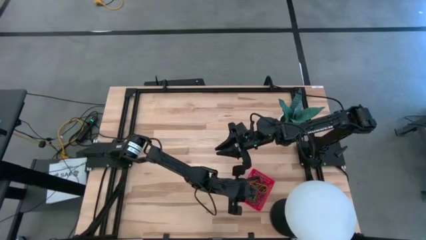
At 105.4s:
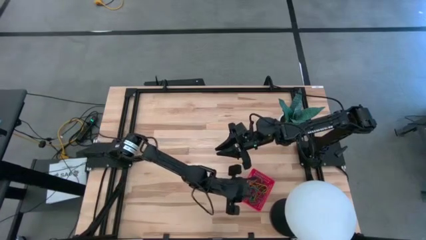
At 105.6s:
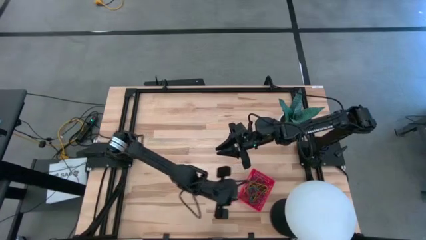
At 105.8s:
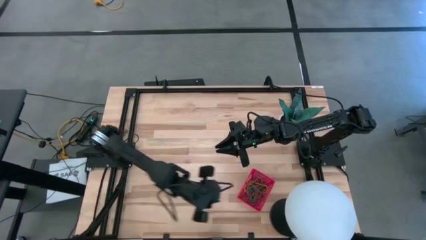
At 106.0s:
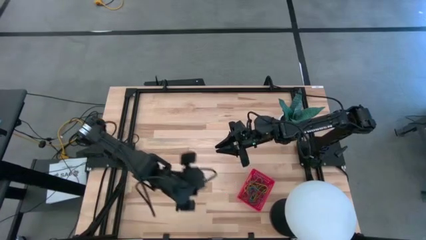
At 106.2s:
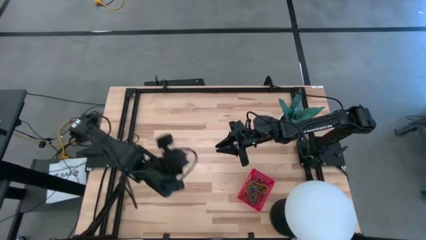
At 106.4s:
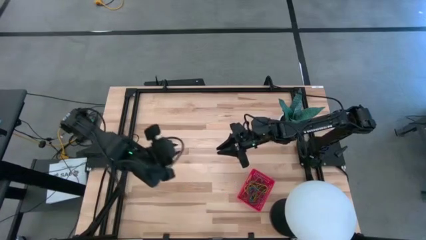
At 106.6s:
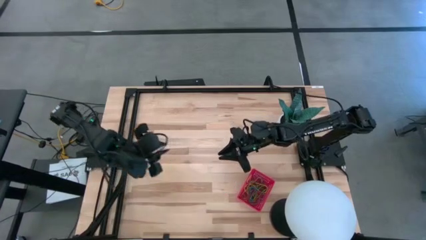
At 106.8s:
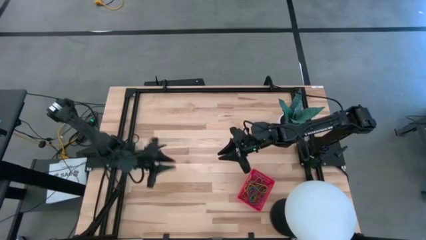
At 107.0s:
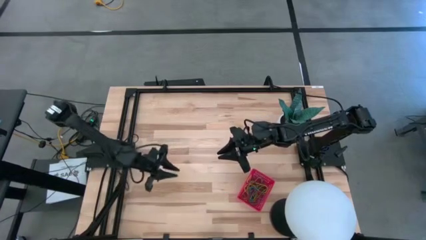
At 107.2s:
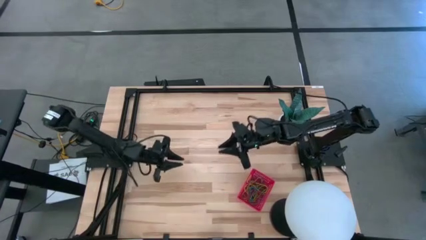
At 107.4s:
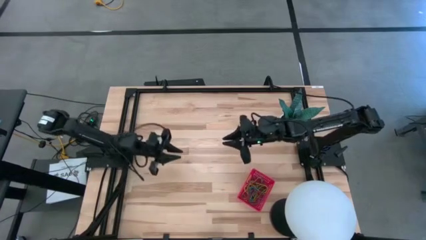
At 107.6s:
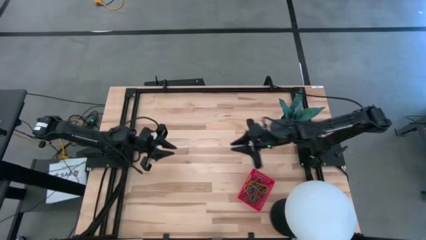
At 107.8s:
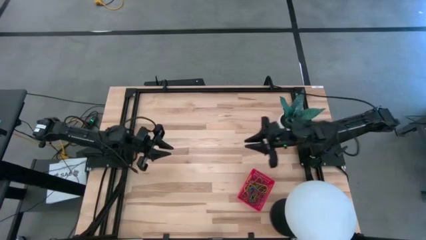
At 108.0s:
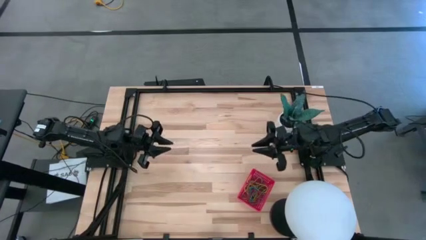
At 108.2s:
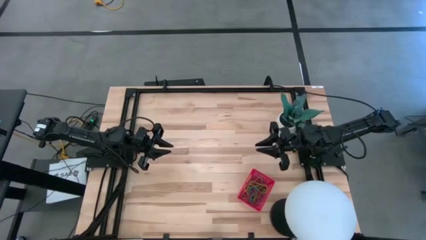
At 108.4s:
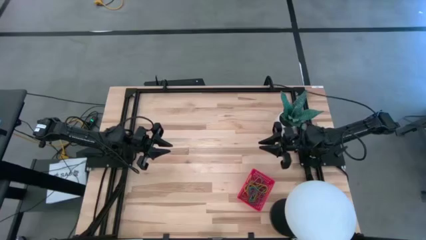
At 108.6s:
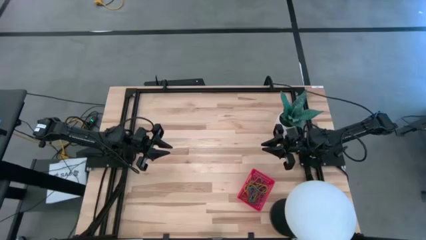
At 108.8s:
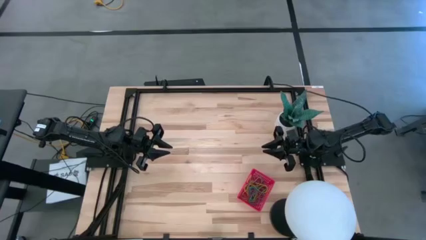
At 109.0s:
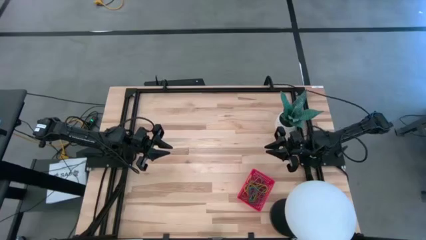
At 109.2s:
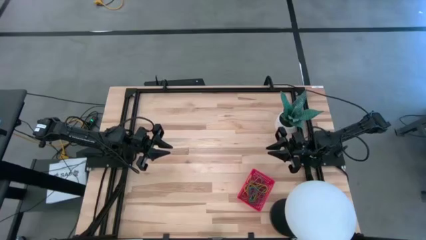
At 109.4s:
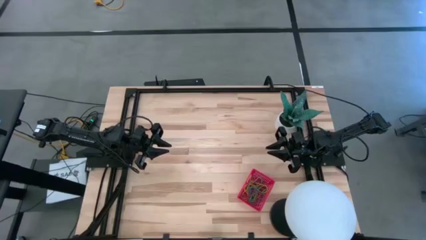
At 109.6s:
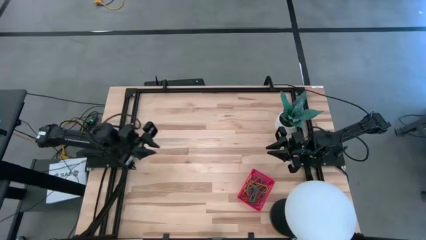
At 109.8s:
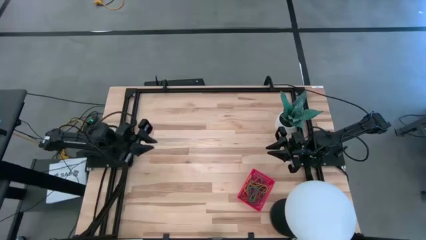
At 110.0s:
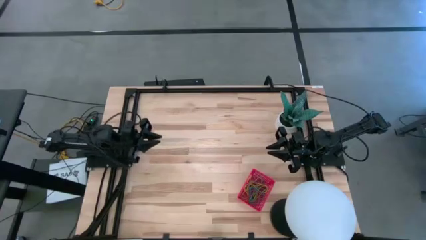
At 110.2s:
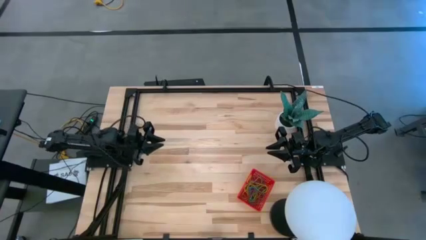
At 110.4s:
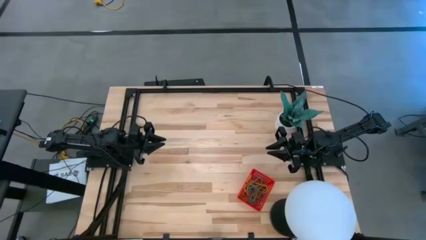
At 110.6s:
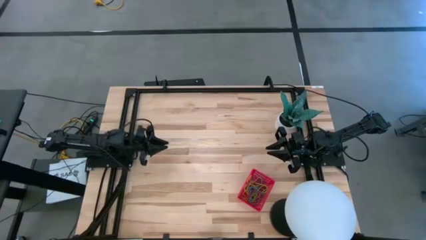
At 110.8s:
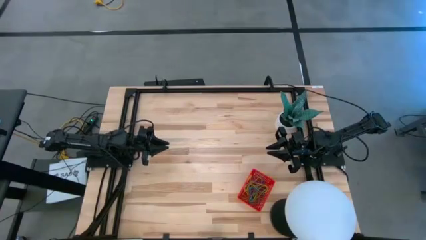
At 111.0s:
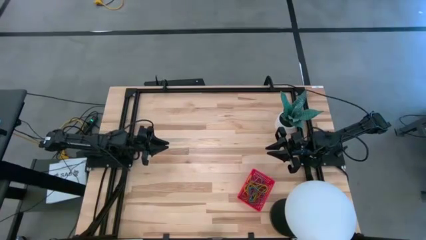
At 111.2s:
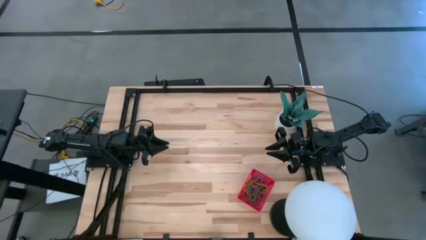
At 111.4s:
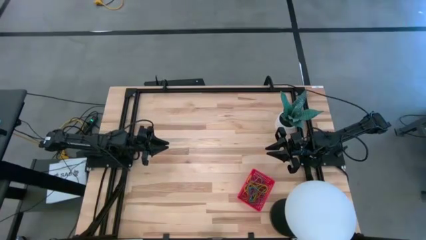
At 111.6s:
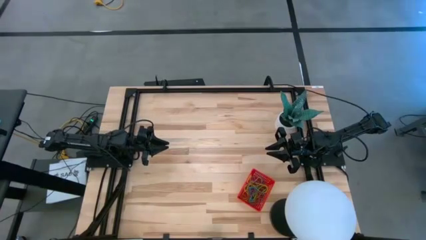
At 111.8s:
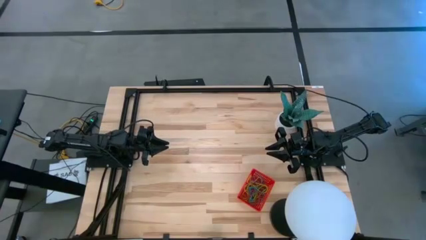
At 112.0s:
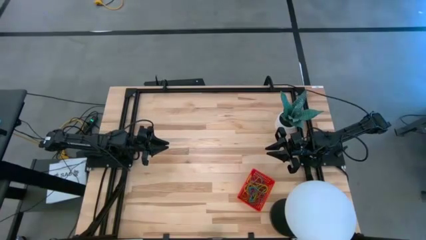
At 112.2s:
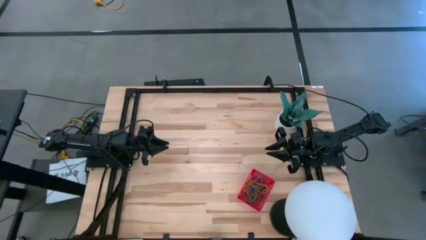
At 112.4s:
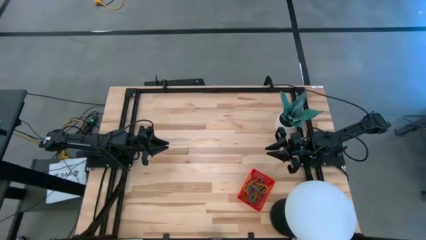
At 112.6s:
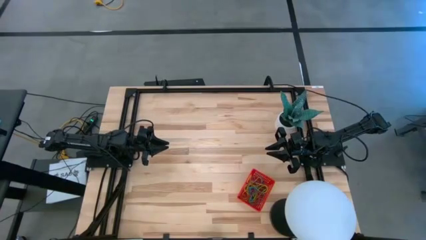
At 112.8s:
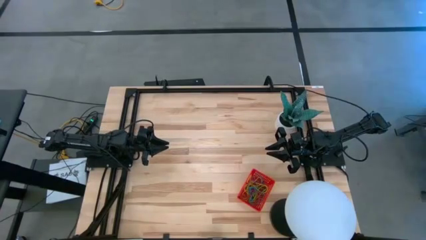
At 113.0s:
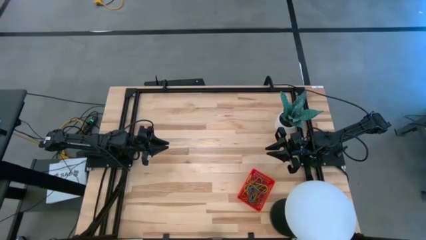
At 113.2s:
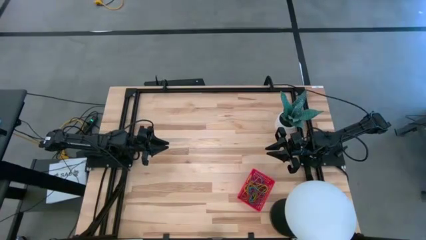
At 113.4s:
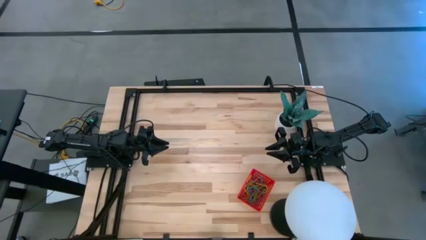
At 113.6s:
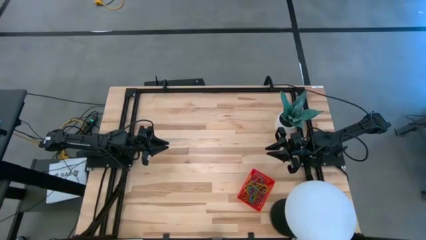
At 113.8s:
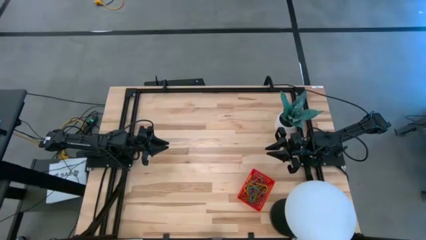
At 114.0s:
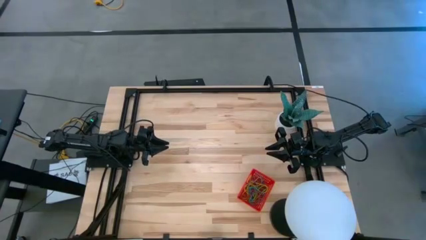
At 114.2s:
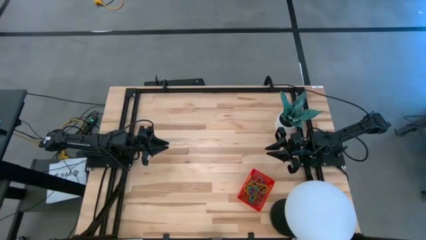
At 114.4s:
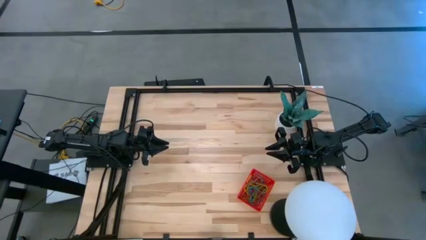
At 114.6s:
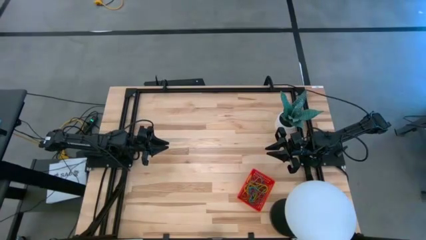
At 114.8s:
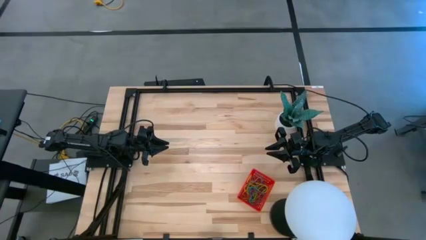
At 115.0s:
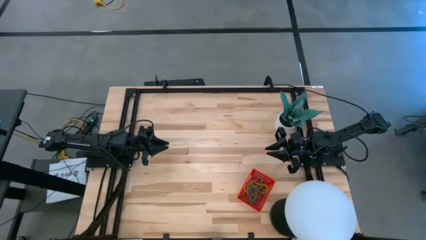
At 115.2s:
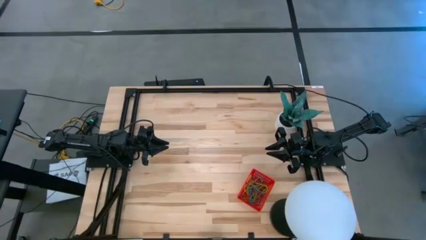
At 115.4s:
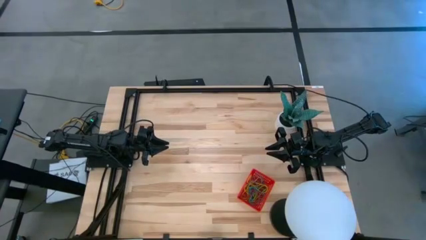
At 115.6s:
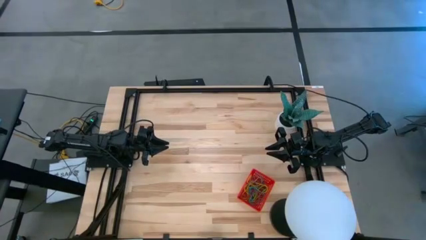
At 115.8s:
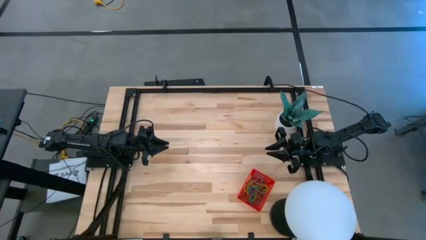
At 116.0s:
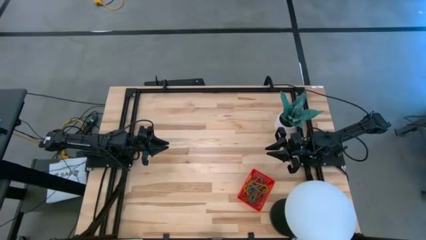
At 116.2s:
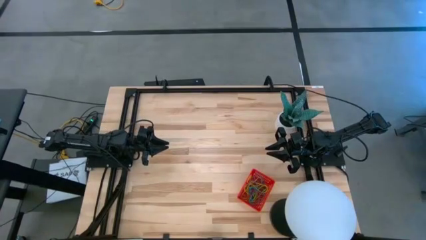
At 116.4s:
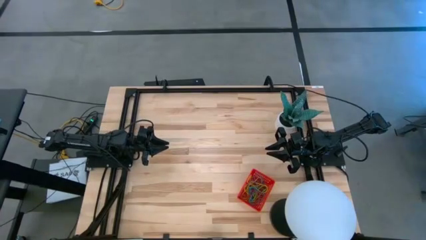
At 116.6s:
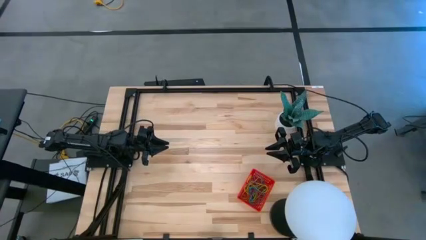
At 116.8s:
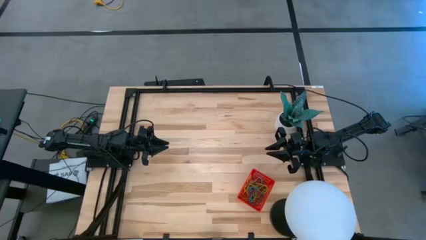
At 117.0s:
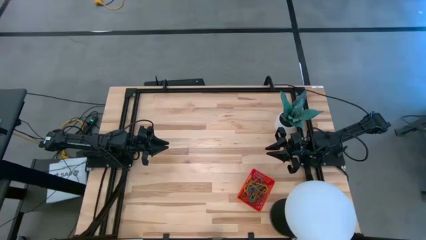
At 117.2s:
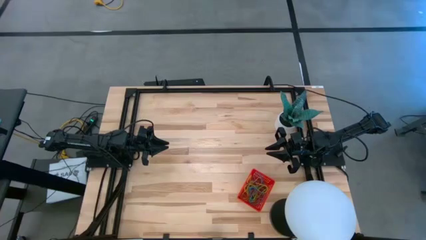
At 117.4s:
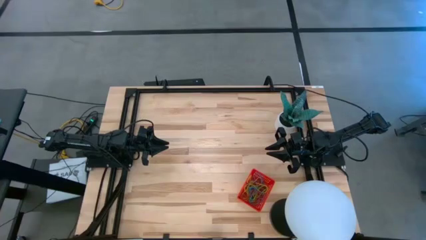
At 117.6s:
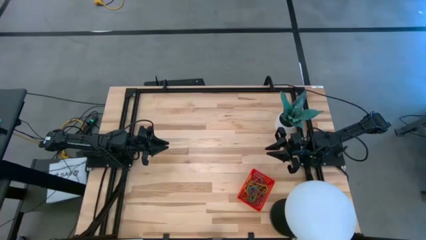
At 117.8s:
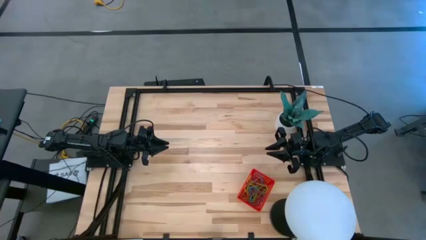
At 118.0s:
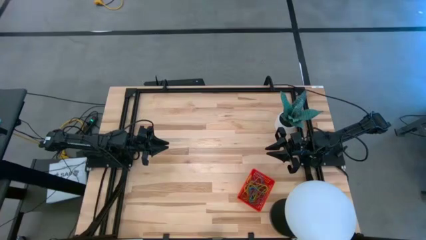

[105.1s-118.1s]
Task: Pick and place items into bin
Return to Home Position

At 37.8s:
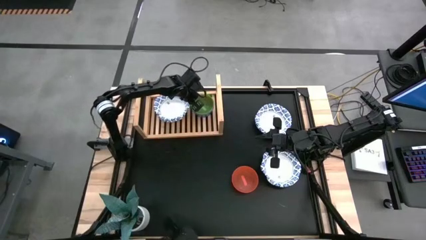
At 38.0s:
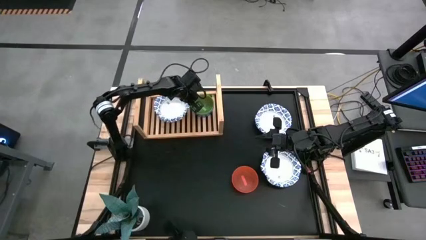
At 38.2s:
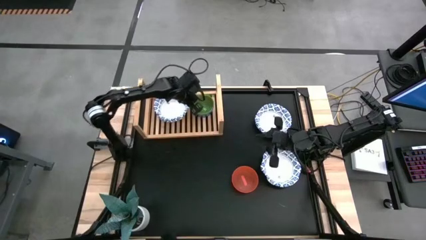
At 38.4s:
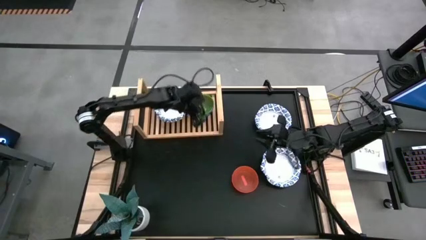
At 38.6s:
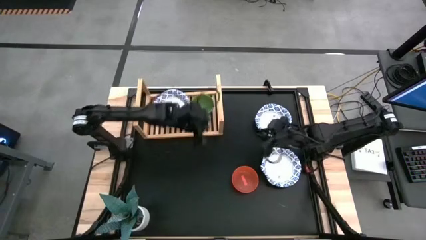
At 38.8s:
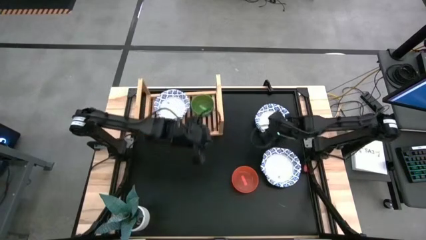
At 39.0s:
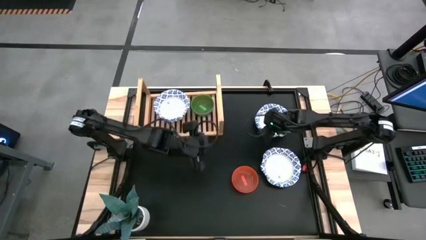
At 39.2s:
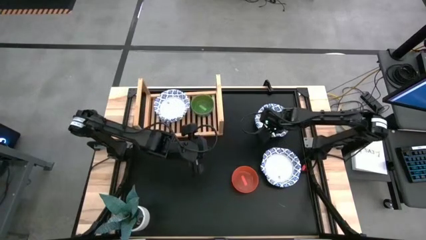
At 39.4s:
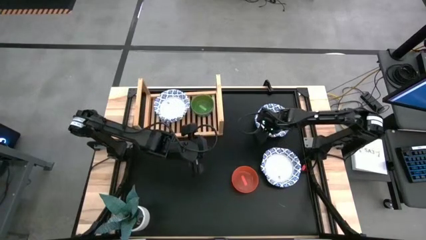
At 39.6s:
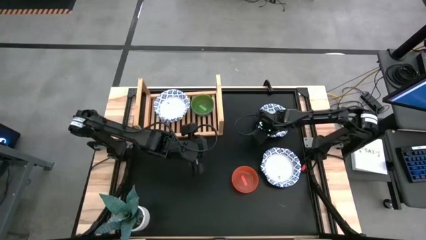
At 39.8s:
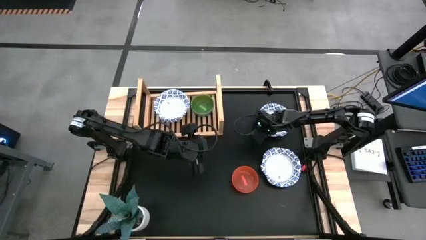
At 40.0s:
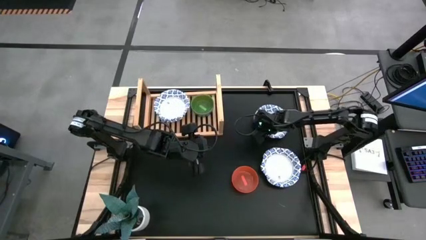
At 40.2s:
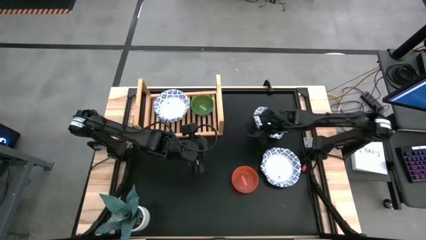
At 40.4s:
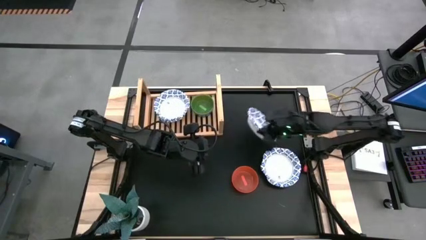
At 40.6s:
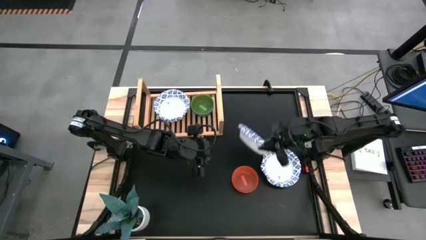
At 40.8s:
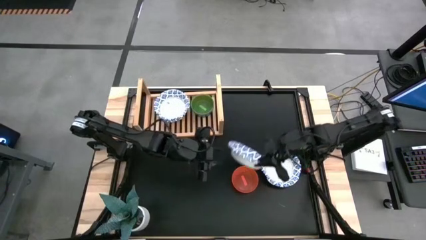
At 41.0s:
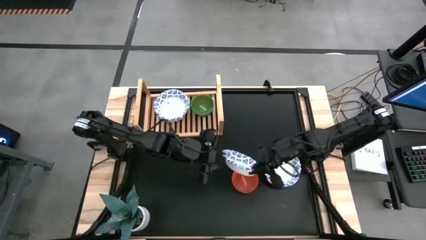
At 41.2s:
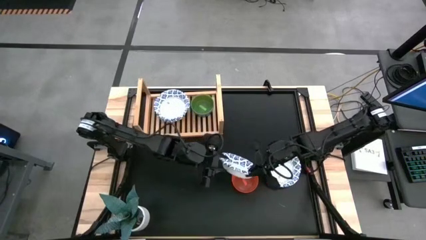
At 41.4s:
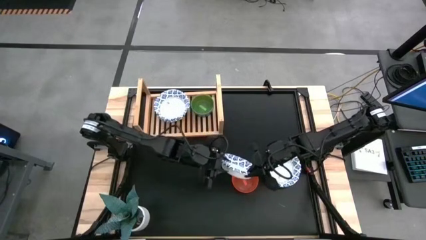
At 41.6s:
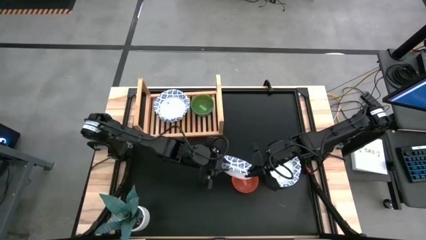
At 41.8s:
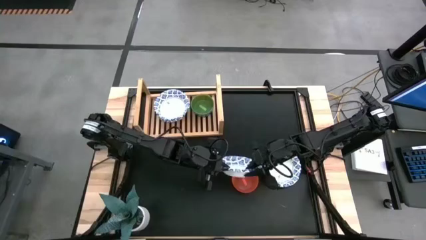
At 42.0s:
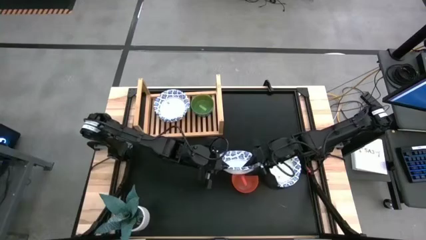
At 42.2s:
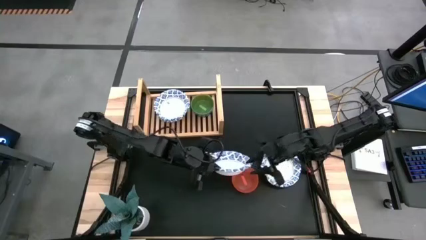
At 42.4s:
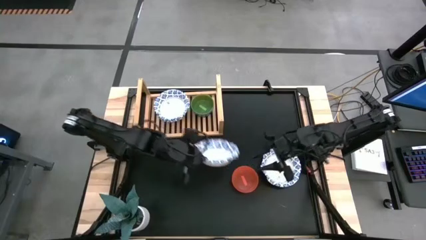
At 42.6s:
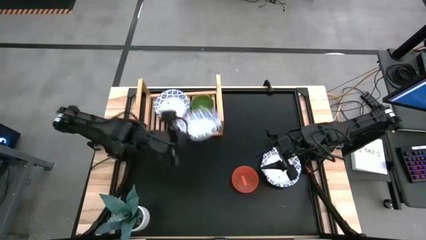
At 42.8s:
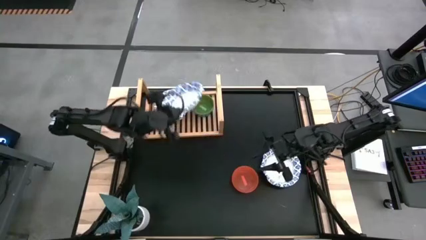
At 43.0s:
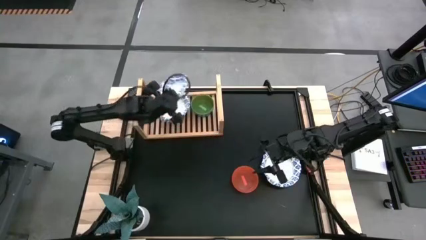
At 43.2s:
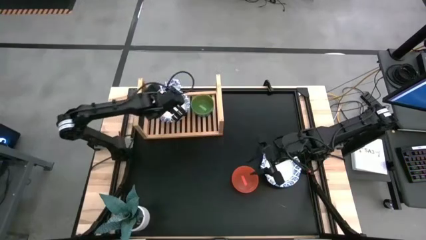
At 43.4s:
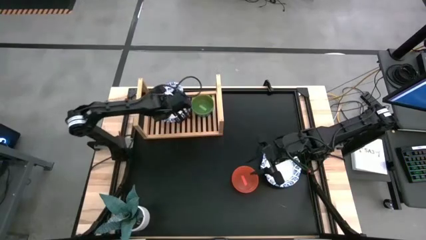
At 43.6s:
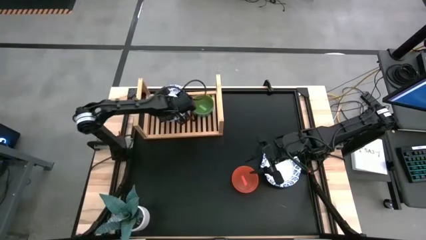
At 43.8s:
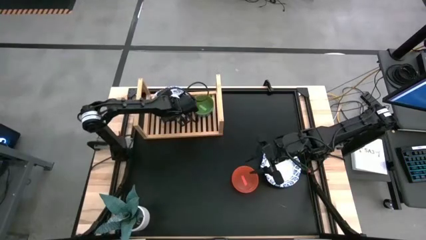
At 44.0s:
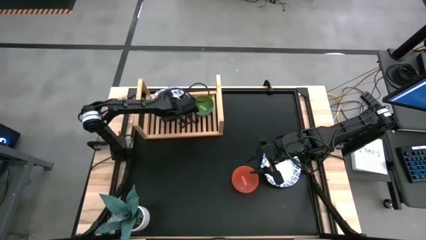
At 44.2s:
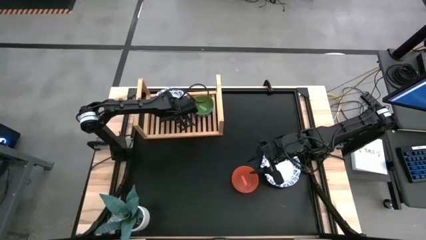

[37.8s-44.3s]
Task: Place and stack bowls onto a shelf
Stack the top white patterned bowl on top of the other white patterned bowl on the shelf
